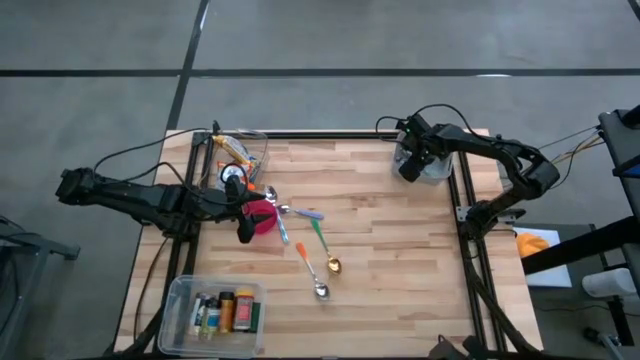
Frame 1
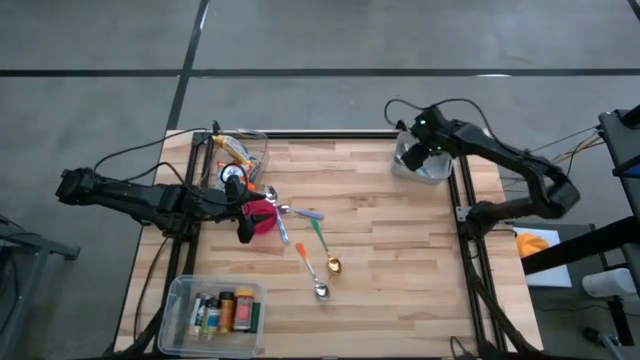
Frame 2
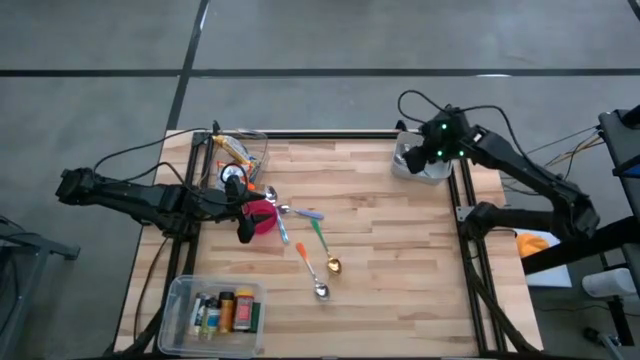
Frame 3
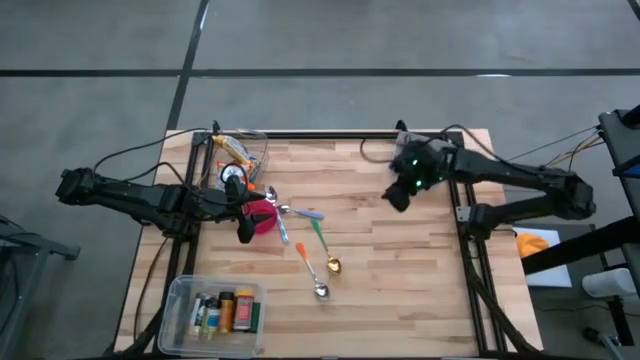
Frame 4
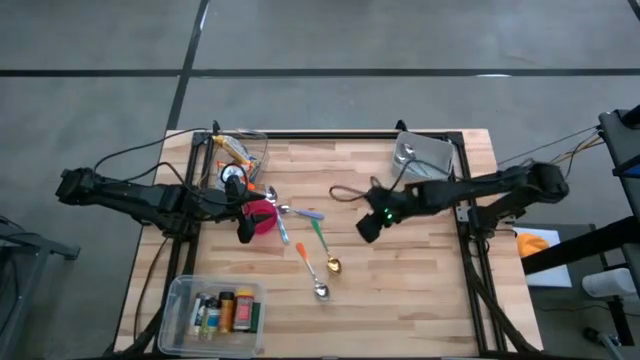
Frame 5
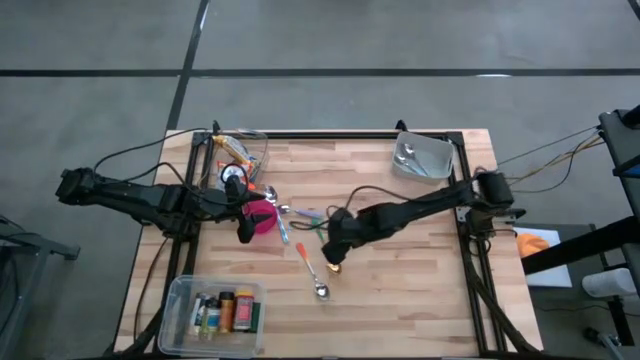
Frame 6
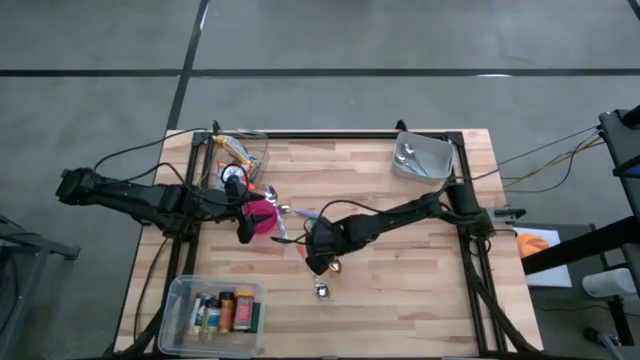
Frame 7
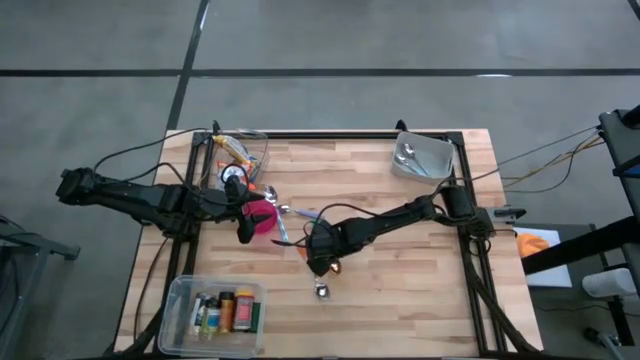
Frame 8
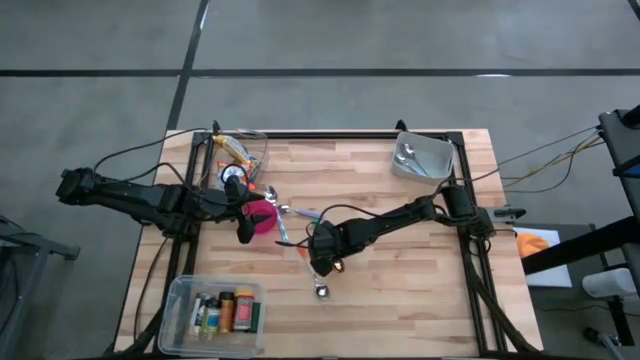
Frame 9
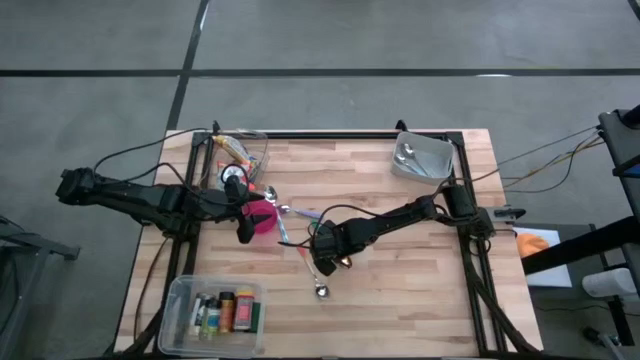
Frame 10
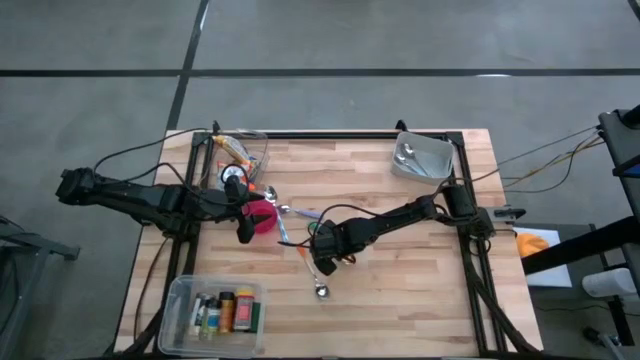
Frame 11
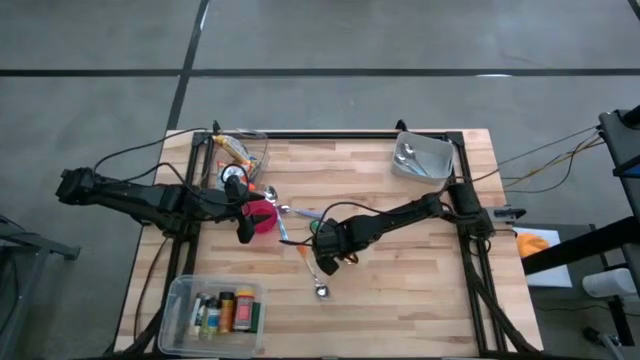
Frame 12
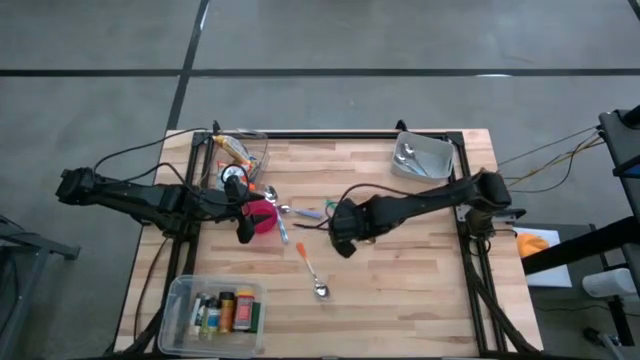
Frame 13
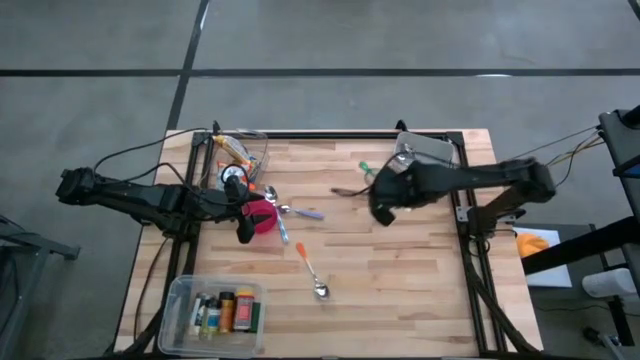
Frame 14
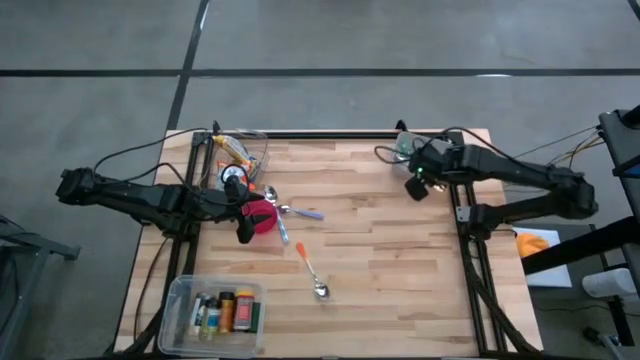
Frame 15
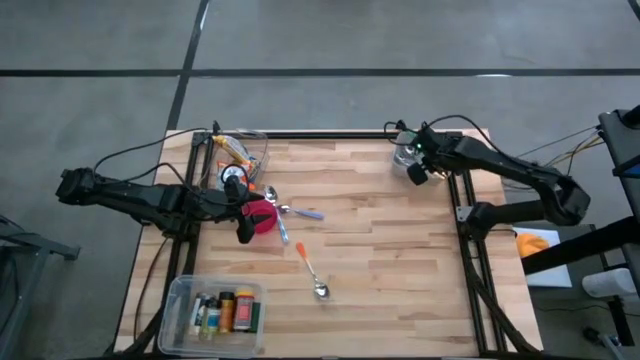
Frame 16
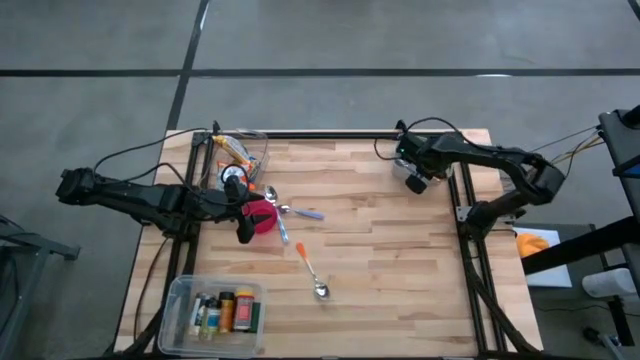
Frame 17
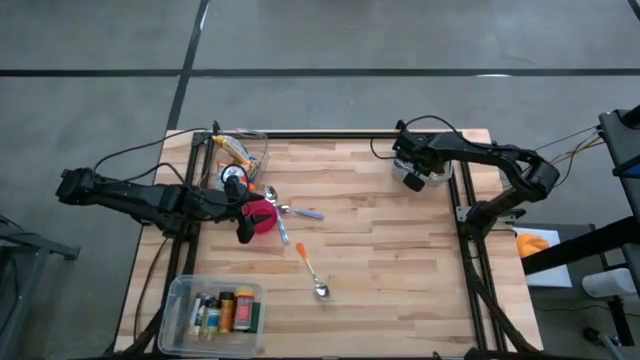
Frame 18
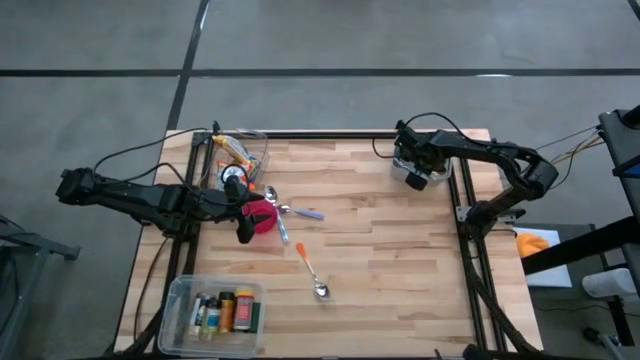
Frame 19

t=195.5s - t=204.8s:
Put the green spoon into the gray bin

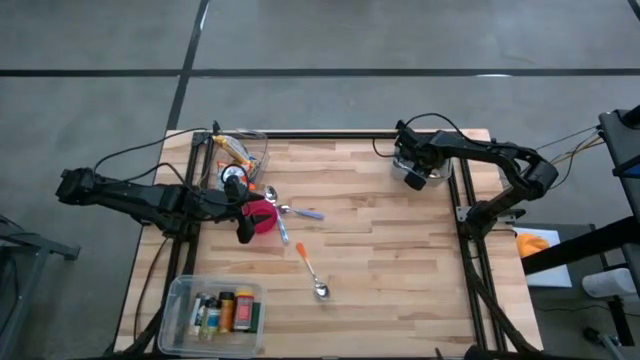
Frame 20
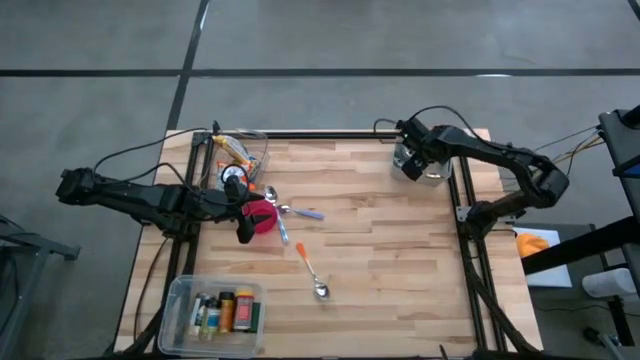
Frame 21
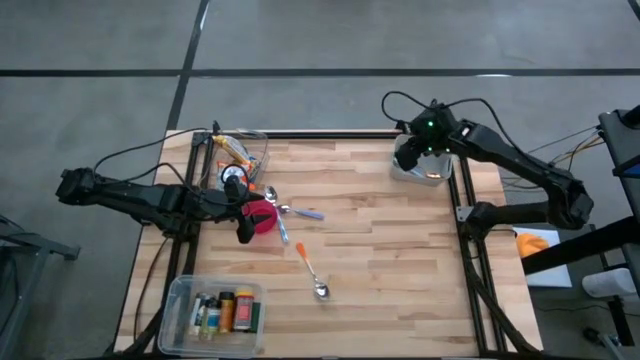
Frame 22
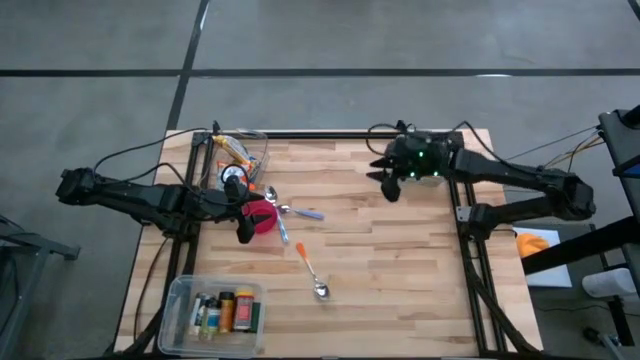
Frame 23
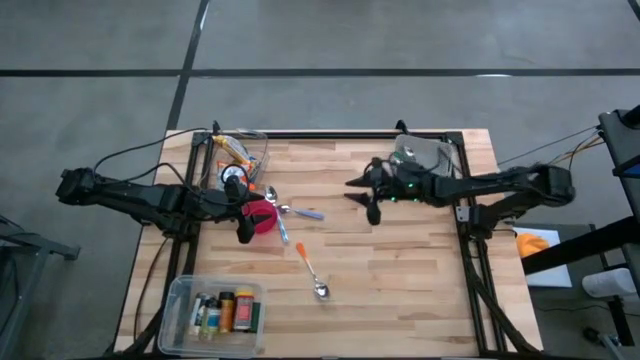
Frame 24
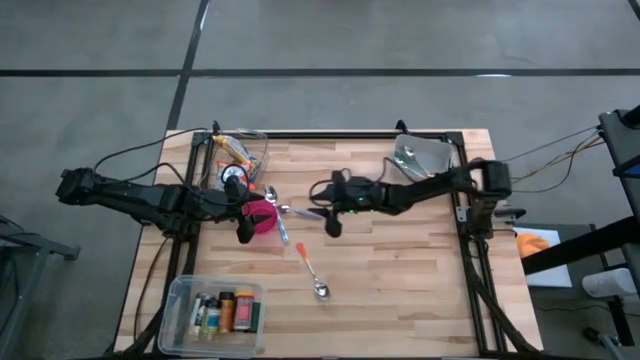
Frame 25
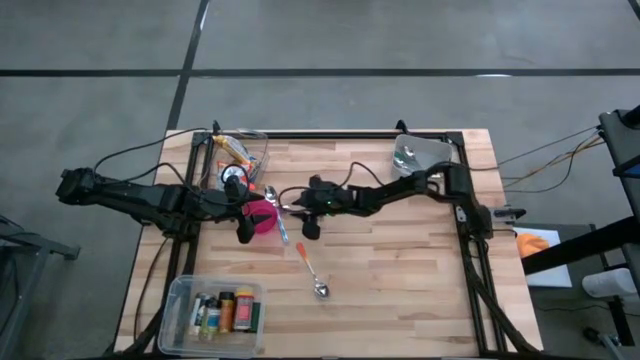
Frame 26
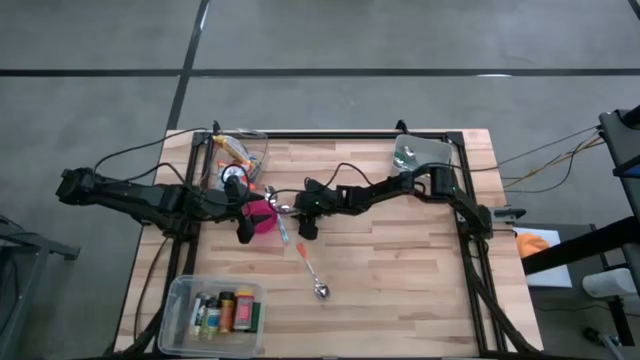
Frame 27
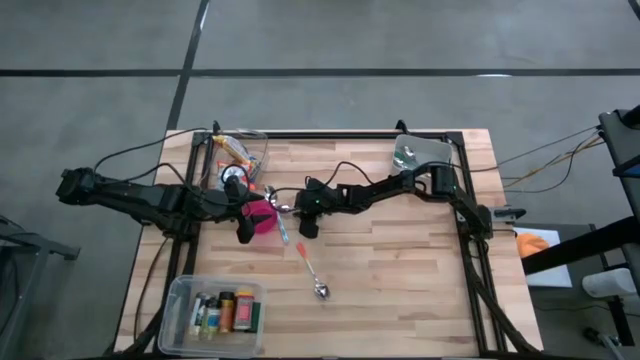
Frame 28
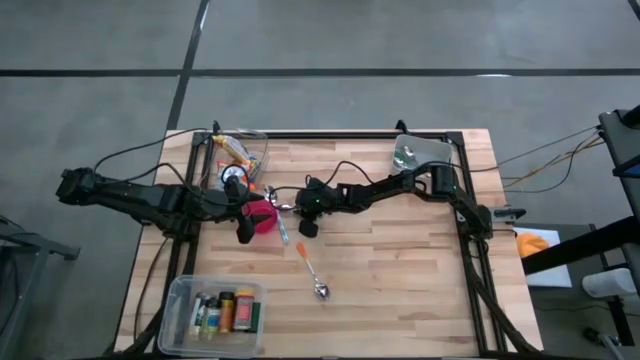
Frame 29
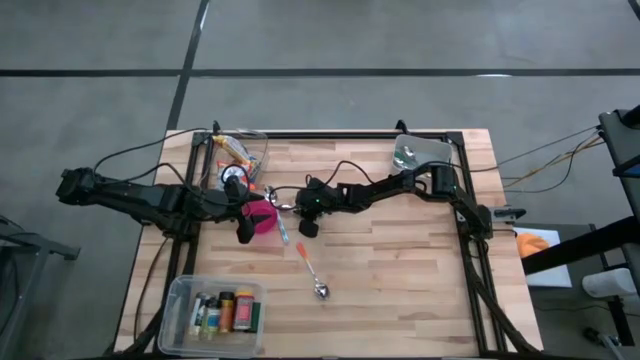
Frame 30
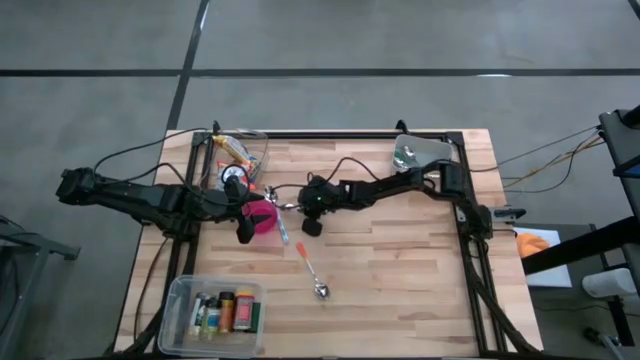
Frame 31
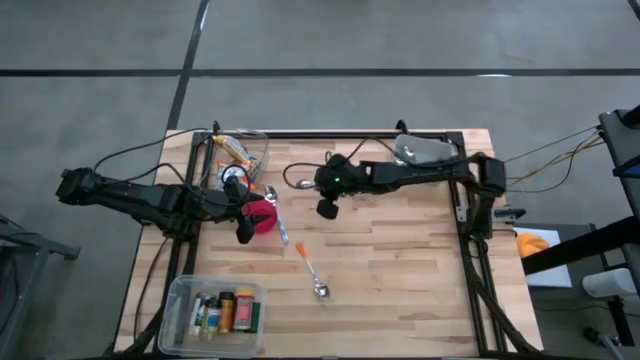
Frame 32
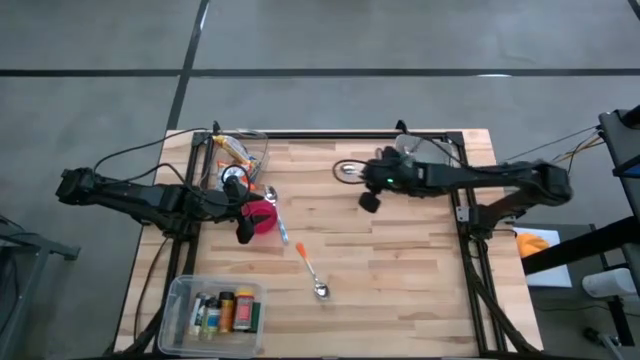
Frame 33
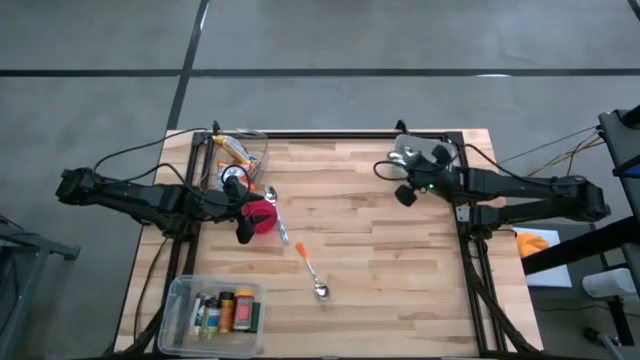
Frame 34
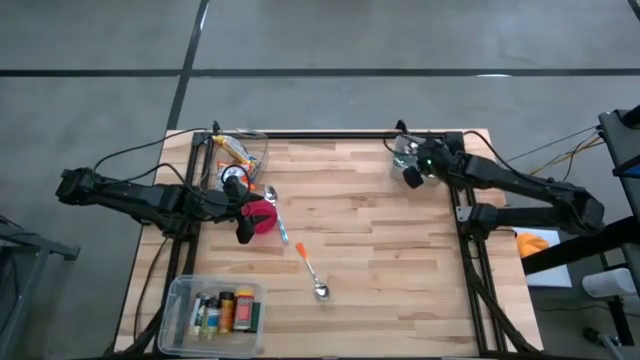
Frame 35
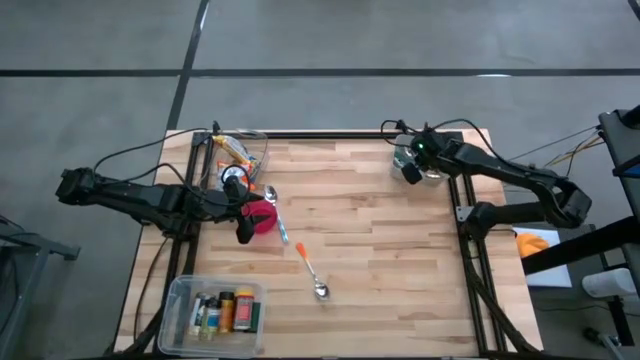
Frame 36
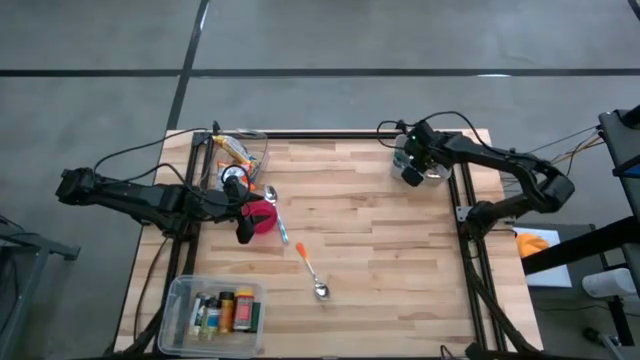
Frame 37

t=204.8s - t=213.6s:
Put the violet spoon into the gray bin
